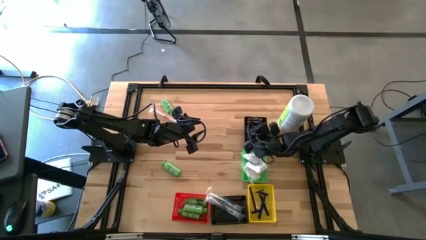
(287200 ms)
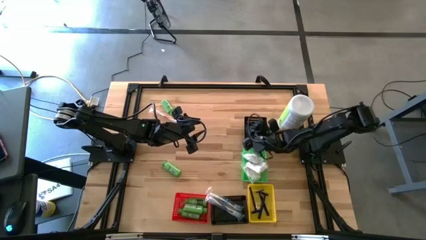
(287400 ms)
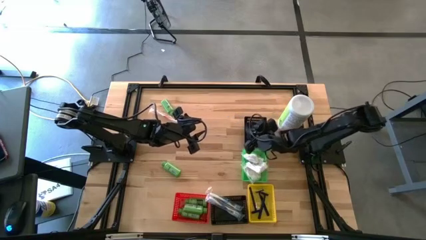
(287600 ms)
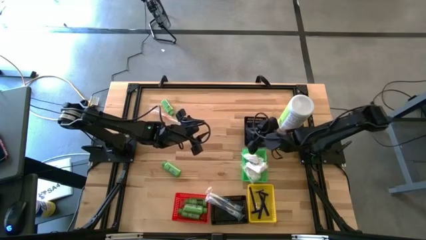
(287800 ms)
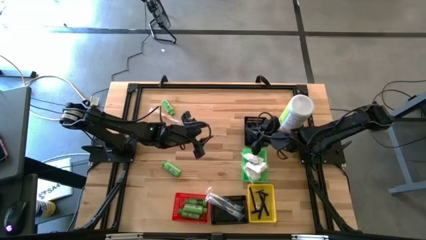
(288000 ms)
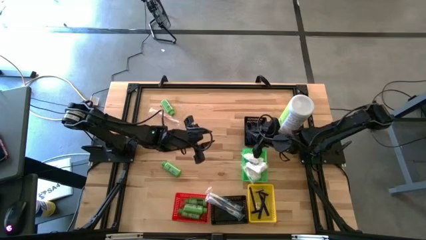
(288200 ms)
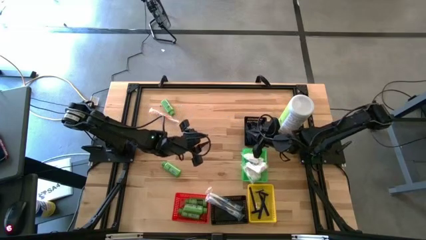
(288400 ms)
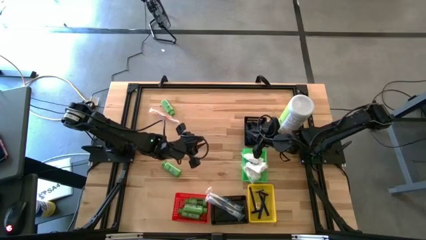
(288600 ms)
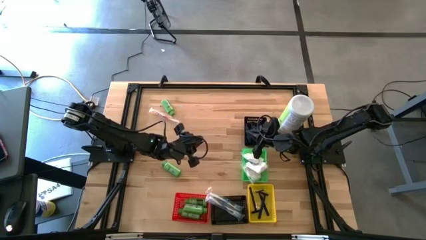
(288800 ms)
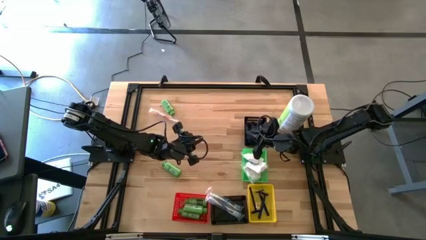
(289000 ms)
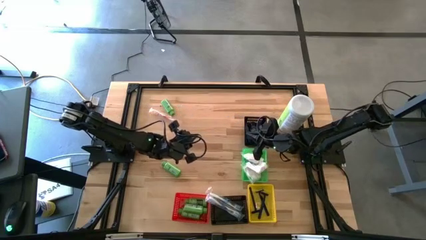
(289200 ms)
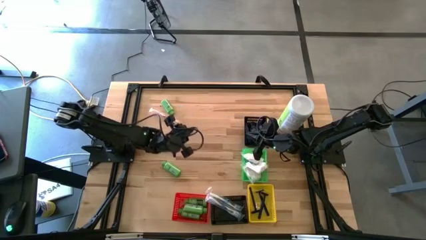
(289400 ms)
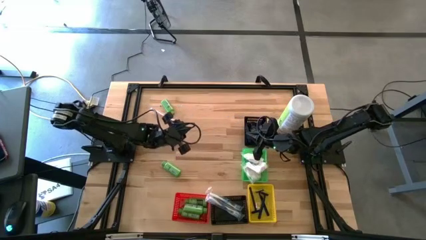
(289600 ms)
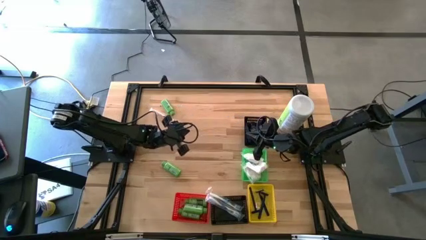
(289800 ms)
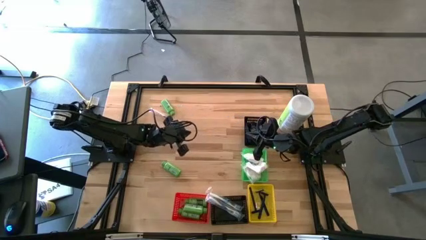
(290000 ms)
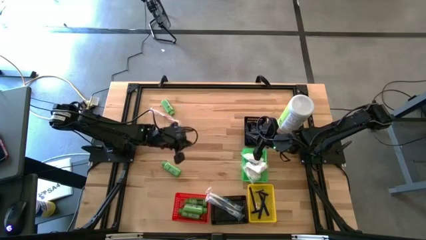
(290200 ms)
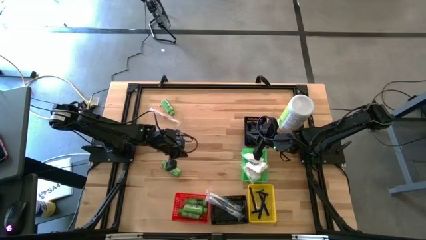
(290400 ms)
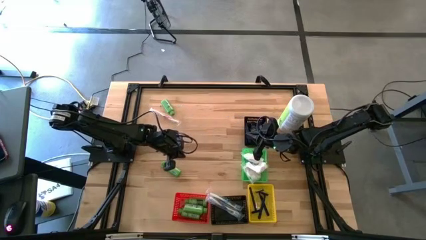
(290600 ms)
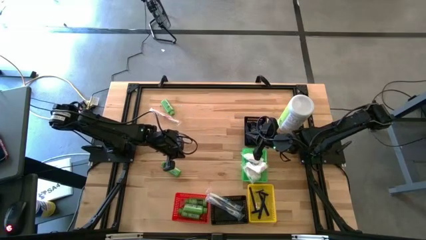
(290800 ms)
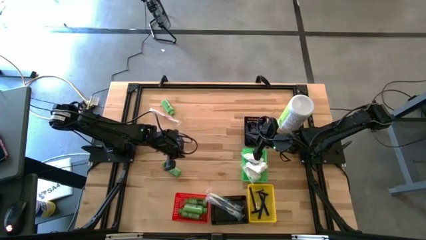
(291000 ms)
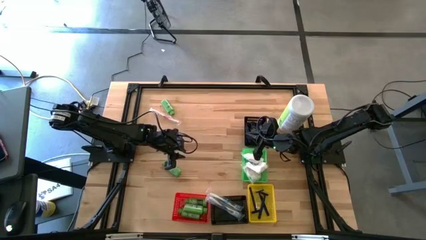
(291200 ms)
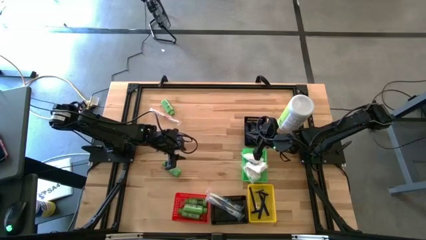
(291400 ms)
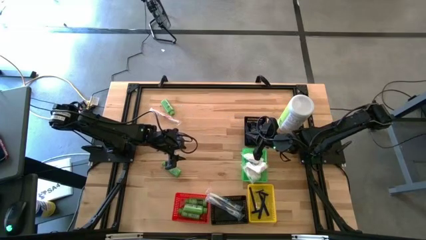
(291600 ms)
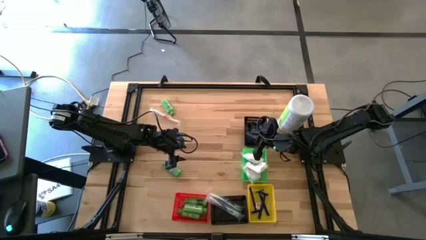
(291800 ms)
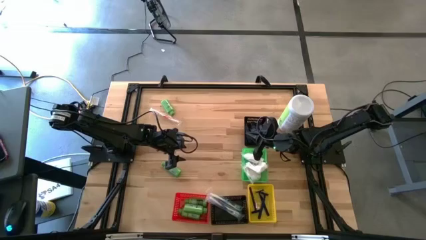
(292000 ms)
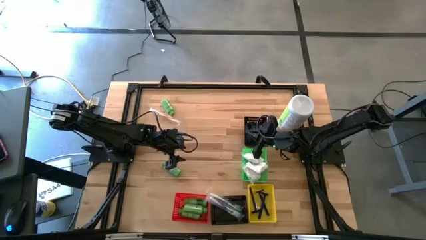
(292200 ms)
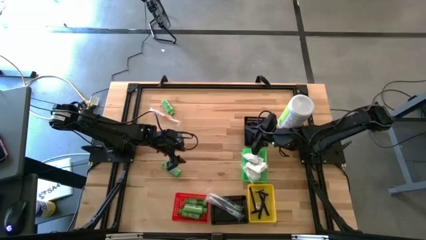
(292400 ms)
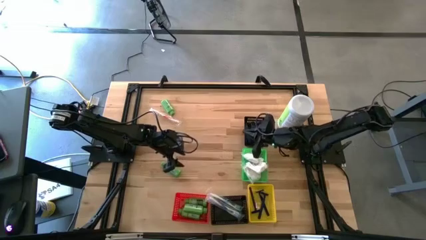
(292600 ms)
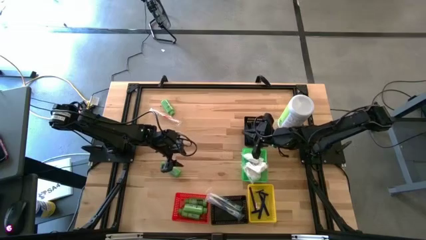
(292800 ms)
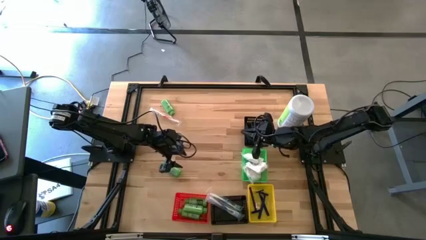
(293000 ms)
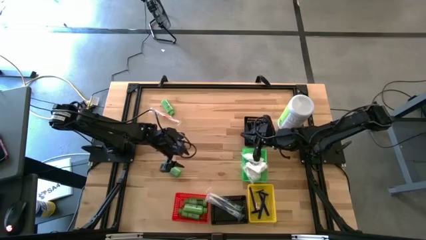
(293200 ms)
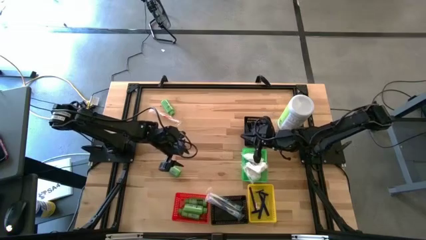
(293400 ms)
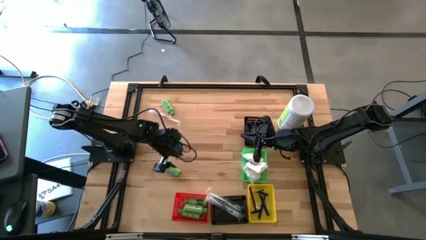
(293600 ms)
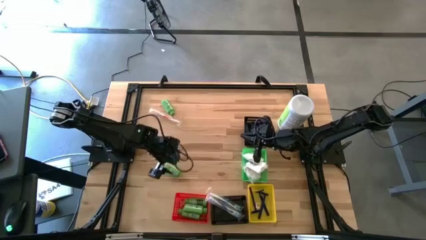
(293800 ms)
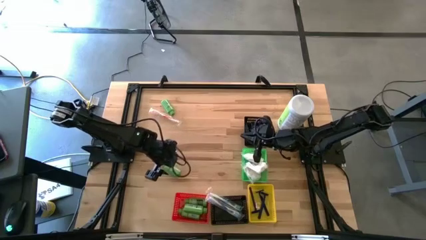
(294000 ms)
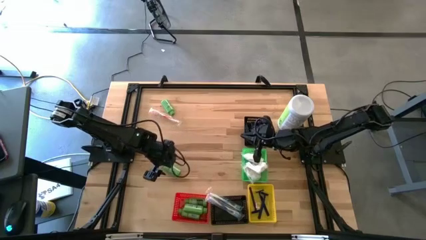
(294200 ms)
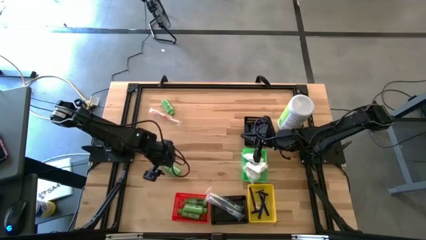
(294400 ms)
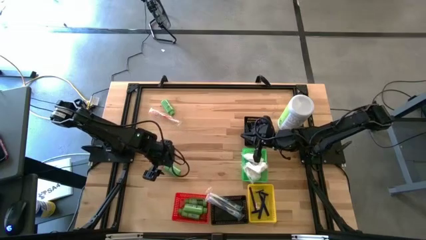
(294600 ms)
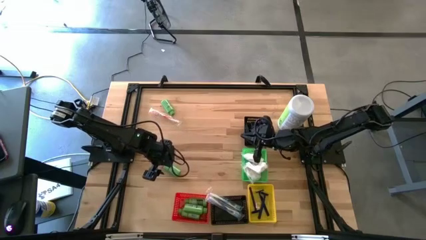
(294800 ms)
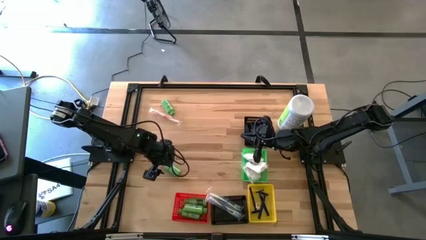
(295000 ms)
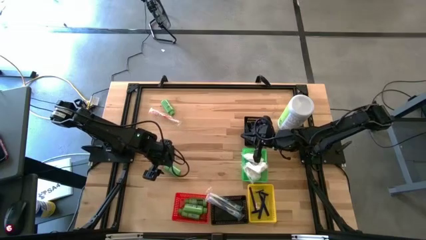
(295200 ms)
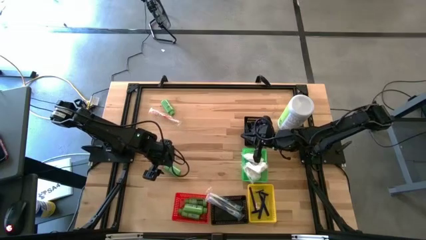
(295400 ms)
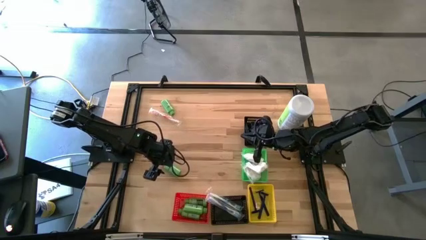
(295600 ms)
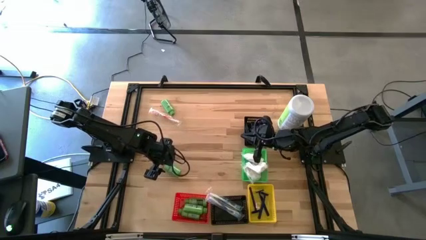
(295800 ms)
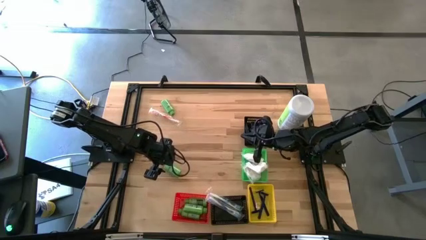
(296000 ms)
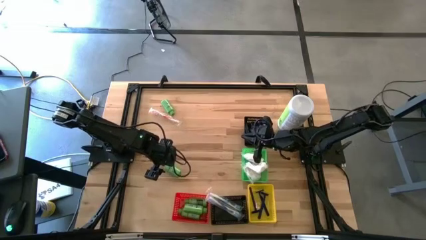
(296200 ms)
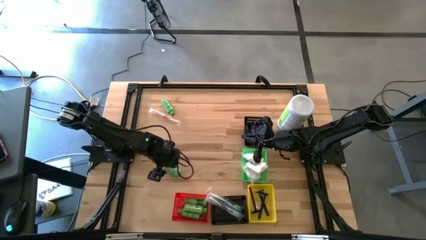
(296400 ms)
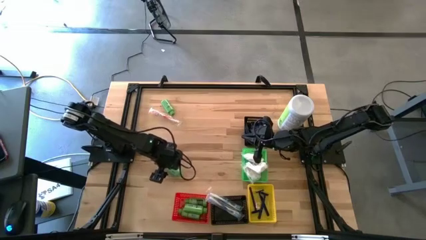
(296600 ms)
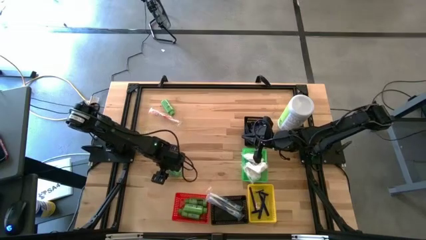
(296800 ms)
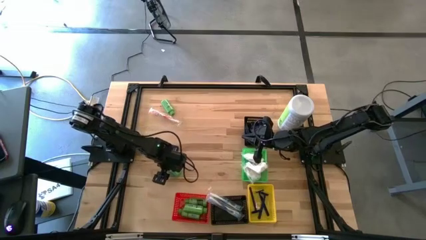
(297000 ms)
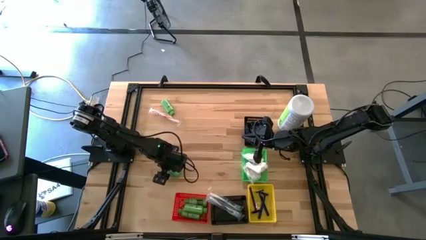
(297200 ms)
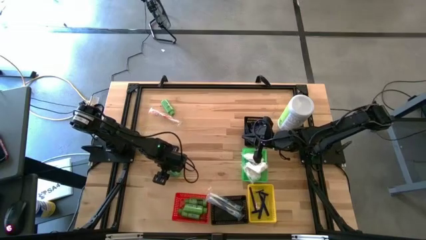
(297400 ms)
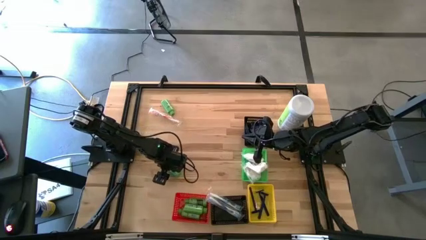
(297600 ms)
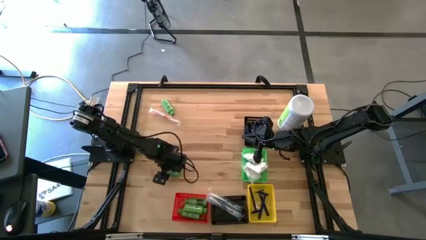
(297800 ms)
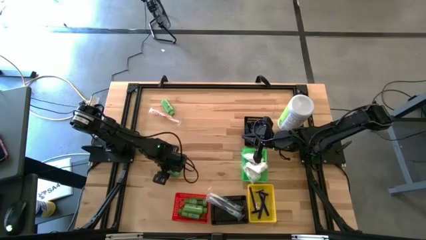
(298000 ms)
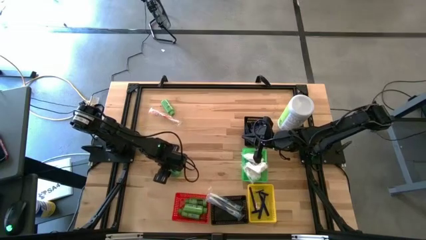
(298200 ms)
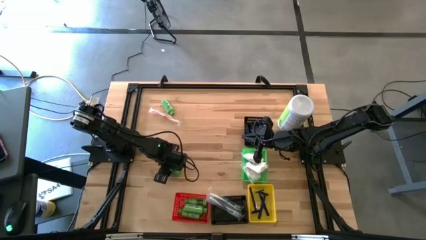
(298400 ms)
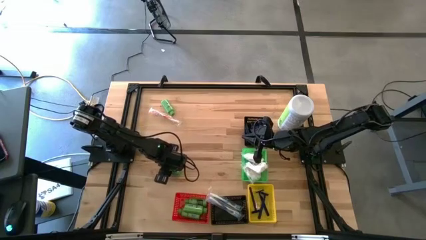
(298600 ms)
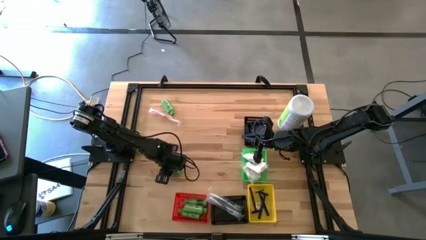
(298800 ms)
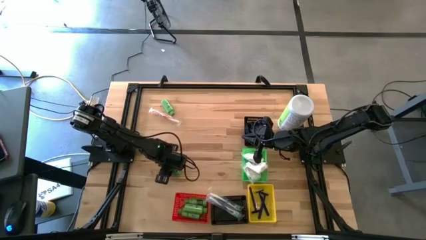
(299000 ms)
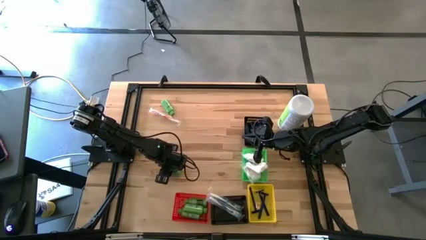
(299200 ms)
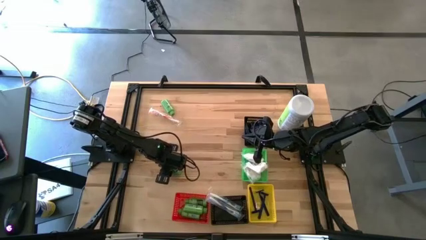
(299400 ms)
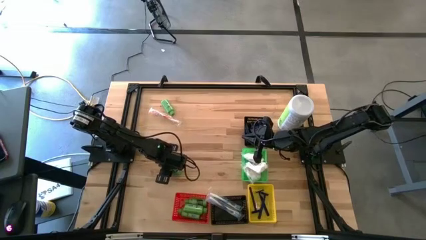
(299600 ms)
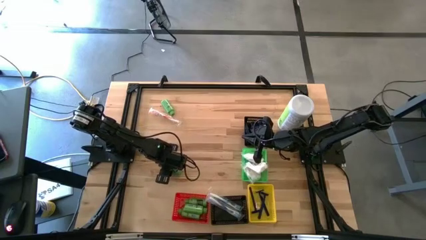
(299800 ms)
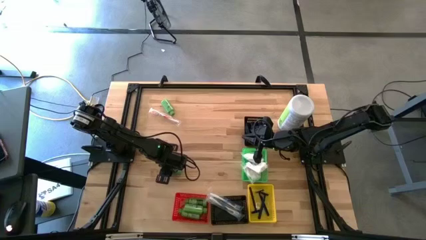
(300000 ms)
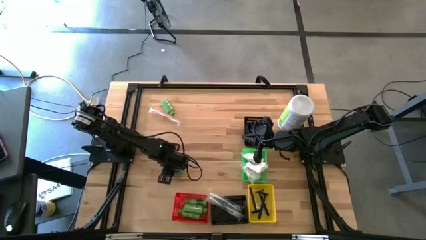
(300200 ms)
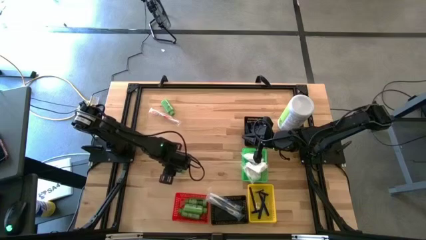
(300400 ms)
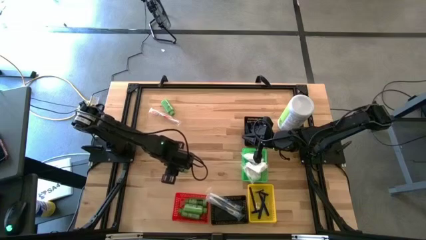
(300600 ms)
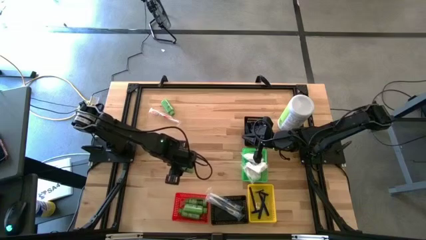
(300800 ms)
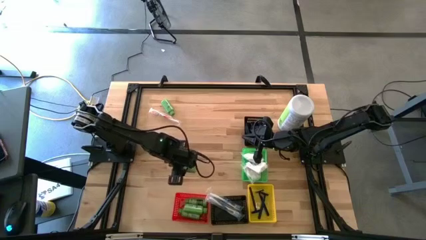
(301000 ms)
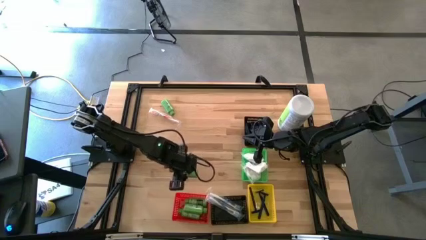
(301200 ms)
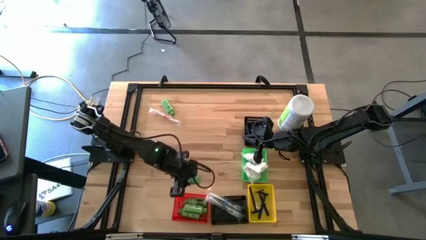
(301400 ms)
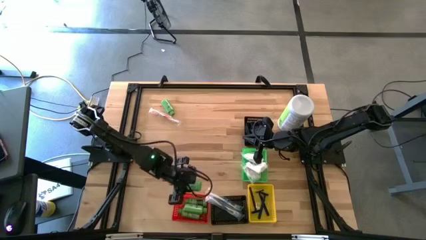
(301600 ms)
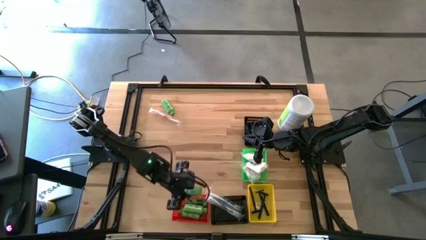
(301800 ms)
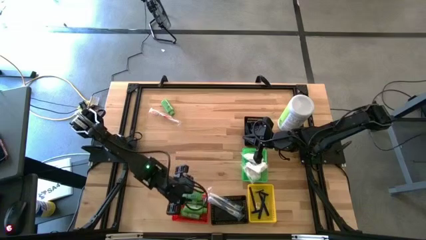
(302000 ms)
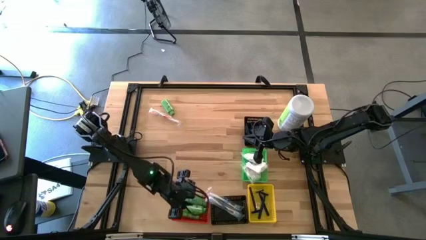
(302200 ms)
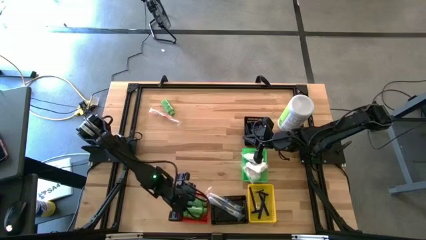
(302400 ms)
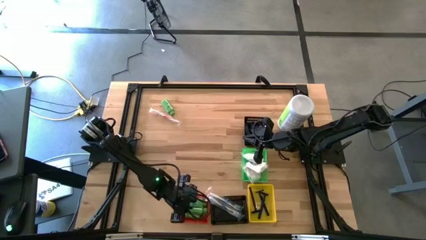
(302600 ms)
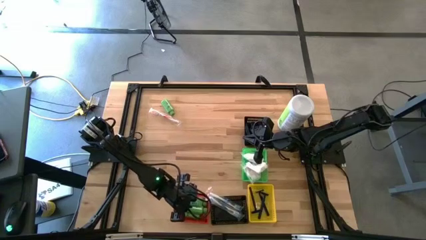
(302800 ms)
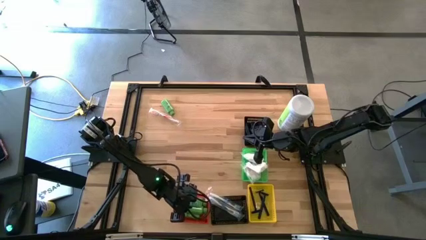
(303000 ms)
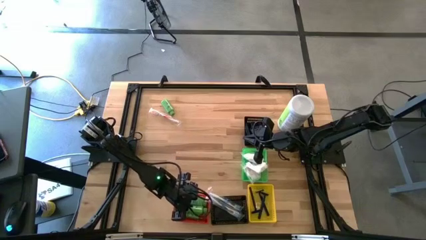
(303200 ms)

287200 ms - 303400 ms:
Task: Pick & Place Travel size toiletries
Put the bottom green shampoo bottle into the red bin
